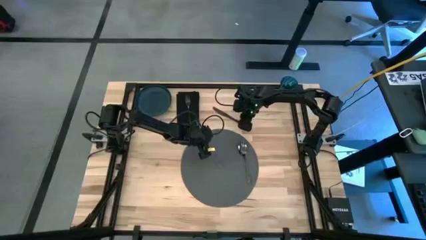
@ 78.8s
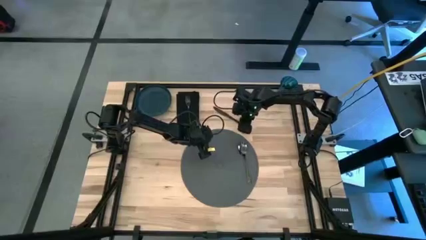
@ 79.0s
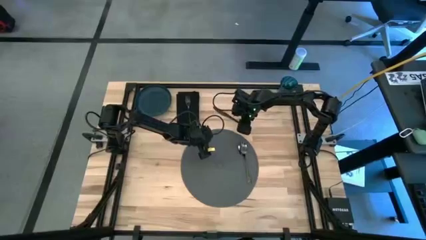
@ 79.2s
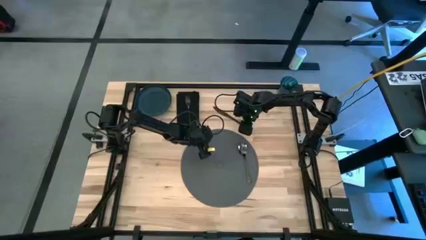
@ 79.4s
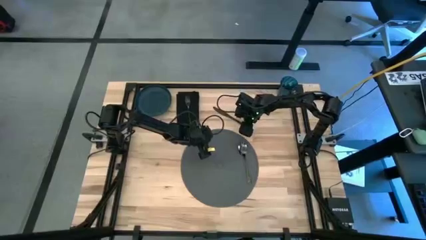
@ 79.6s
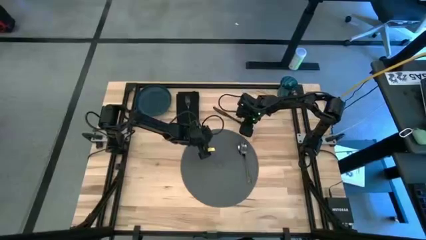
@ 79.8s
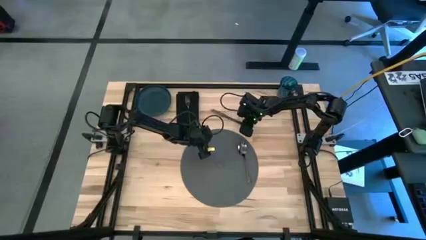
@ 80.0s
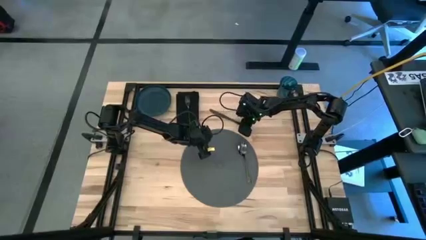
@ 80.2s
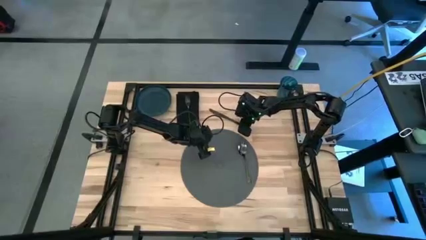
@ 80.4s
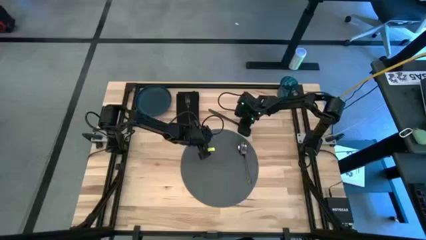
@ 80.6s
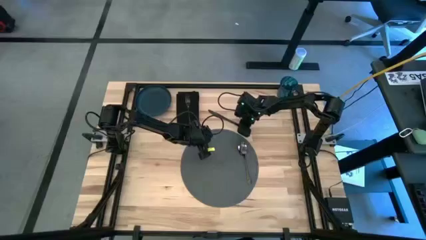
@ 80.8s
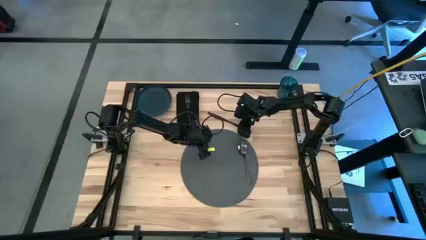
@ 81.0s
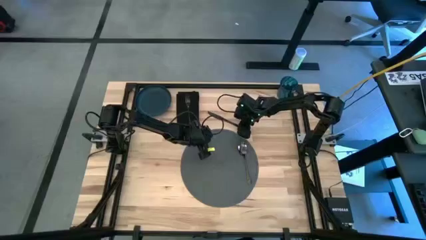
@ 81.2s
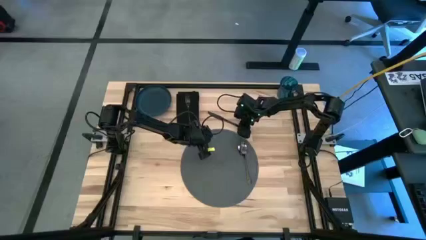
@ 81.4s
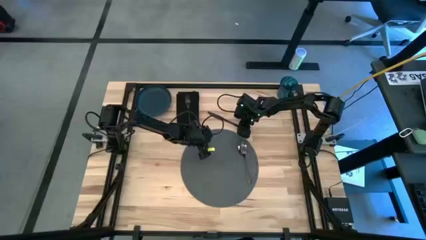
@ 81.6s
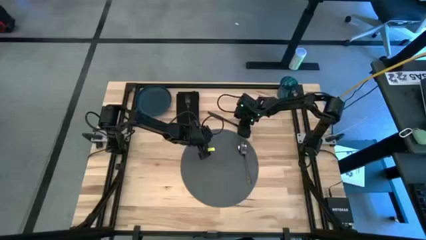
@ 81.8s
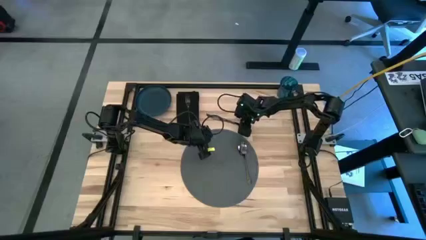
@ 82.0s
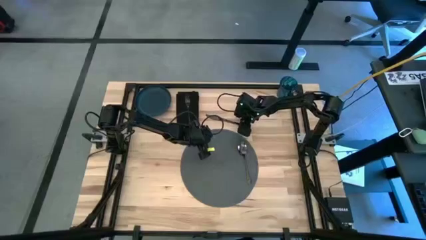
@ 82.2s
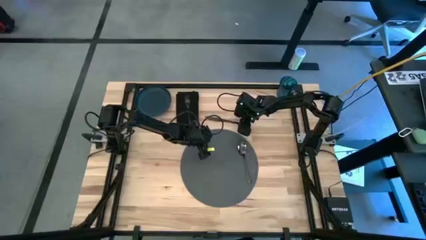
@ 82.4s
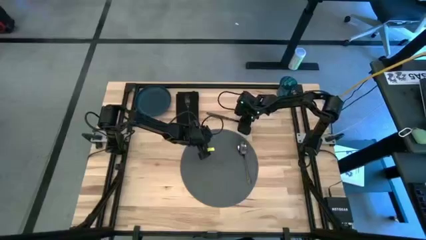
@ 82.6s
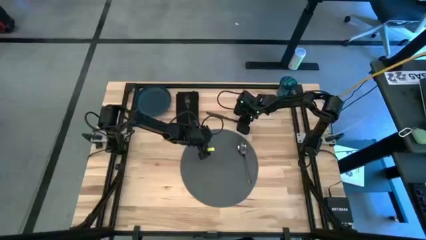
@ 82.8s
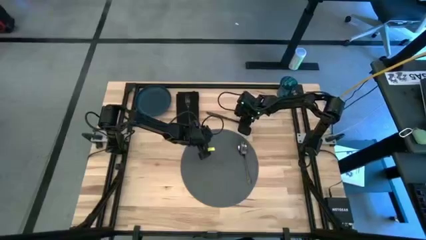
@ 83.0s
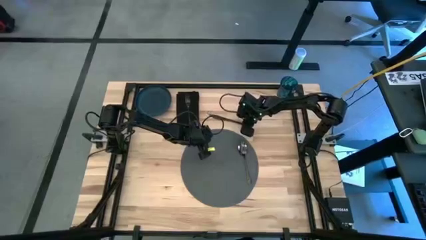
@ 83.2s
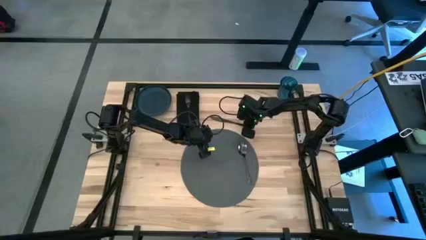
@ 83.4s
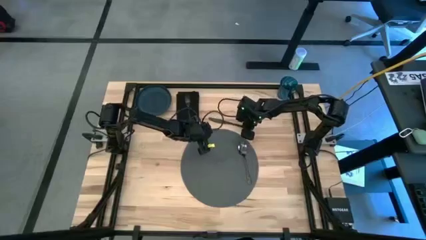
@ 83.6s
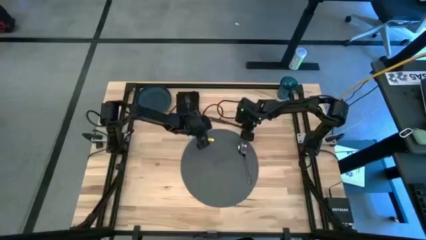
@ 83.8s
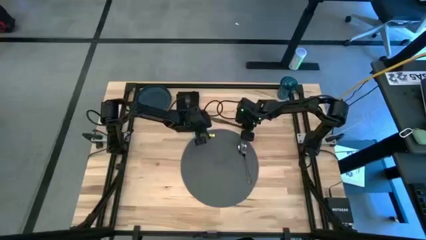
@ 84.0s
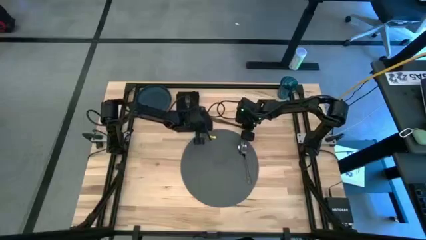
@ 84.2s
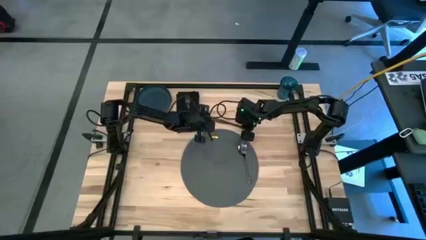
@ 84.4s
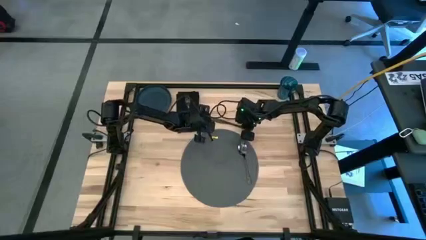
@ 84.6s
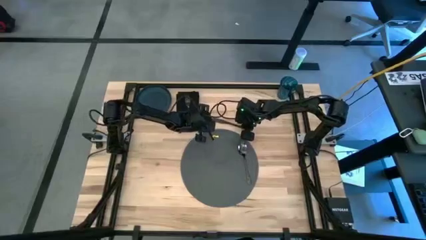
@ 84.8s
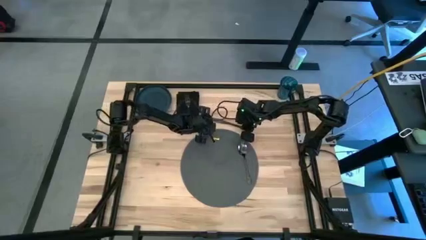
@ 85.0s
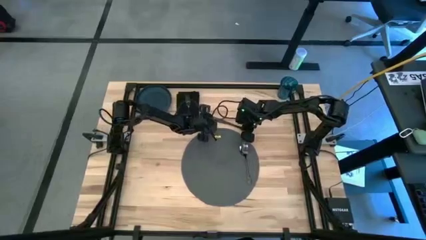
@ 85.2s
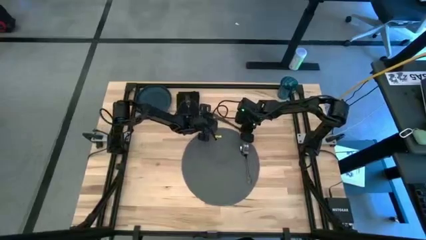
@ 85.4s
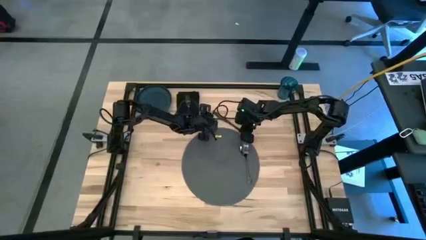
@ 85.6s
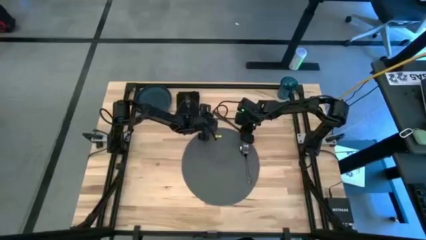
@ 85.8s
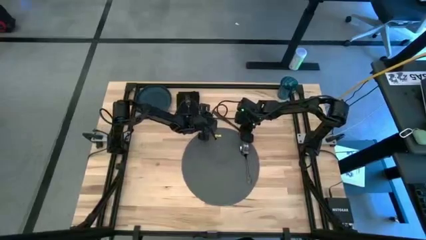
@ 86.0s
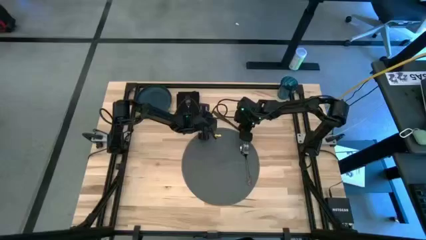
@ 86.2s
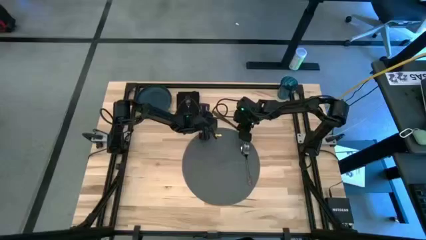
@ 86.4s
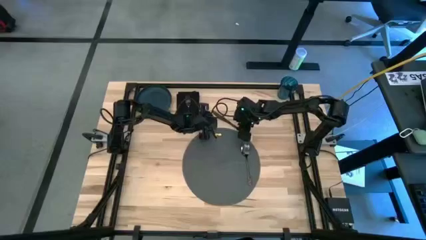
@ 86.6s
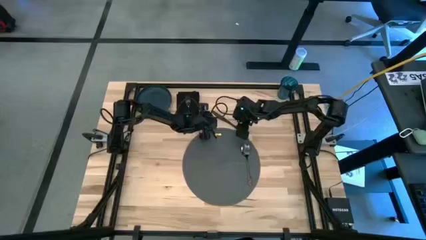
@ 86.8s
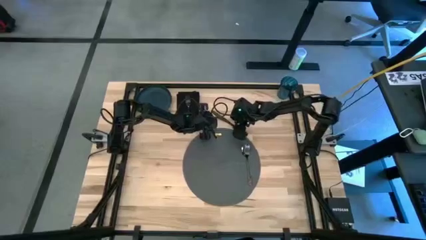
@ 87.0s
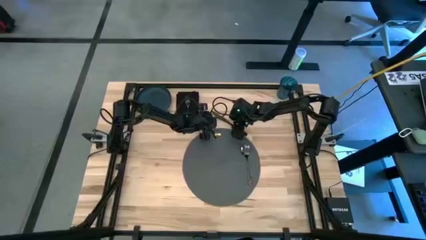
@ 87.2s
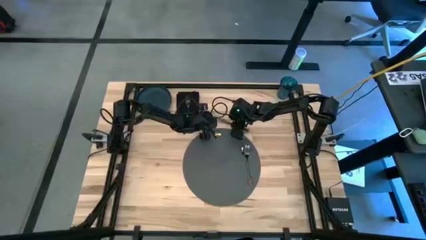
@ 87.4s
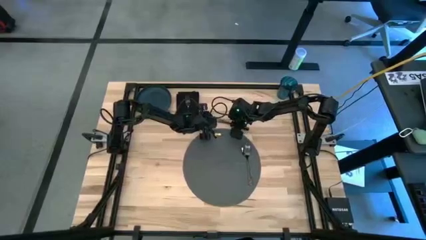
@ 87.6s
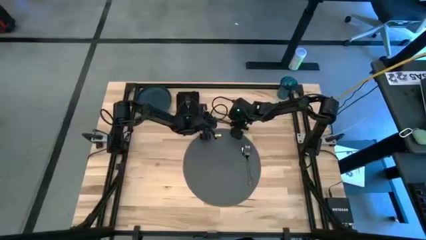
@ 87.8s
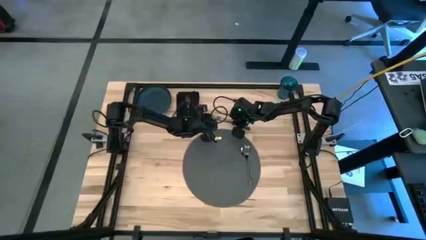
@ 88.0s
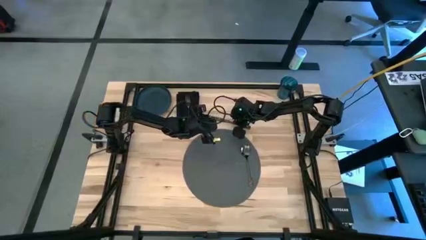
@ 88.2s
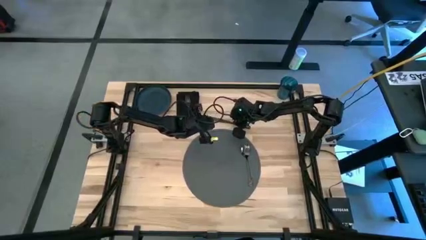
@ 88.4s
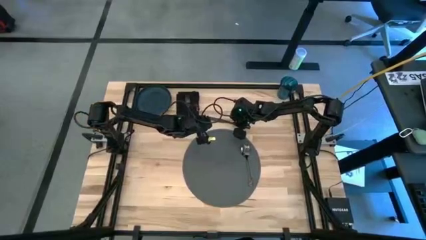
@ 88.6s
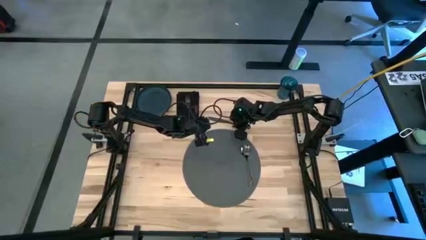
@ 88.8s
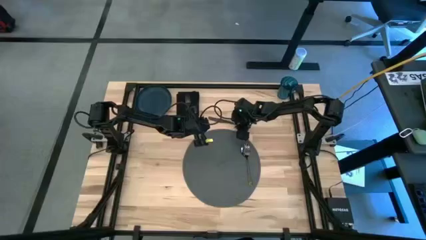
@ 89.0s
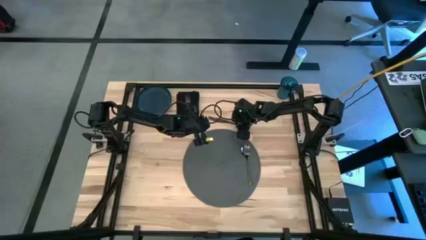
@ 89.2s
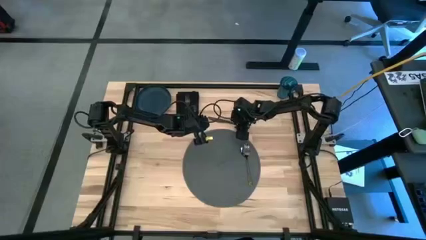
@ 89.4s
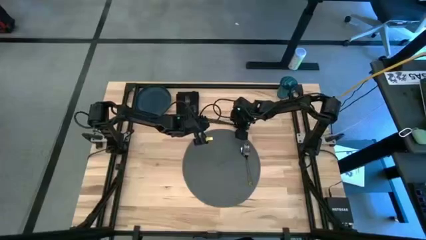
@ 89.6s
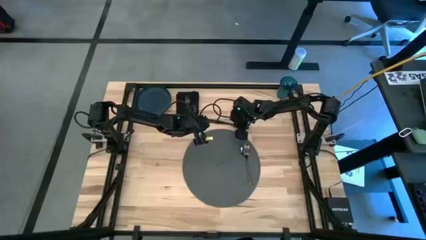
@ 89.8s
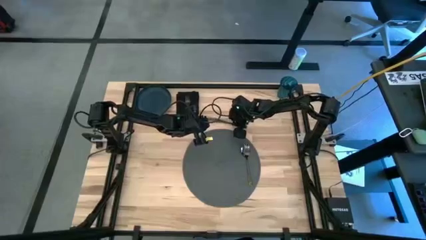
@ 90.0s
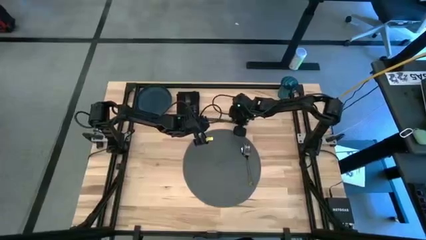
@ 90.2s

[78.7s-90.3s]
Task: Set table place
Put the black table knife on the gray tablemat to the left of the black spoon

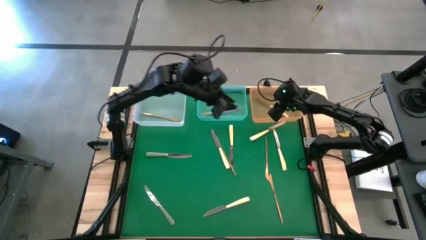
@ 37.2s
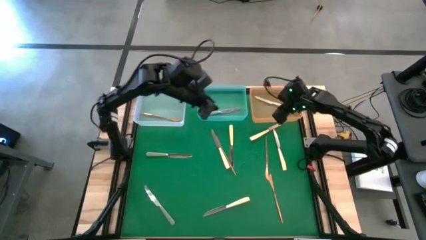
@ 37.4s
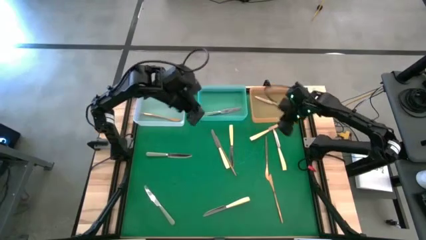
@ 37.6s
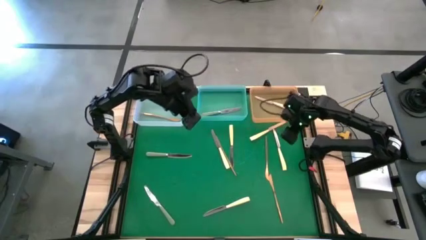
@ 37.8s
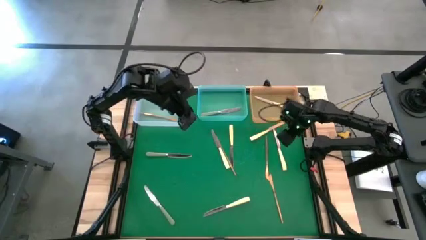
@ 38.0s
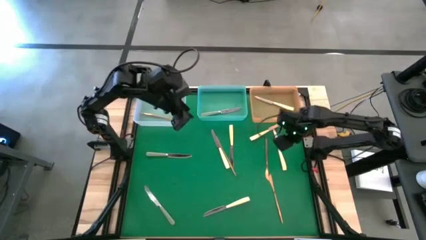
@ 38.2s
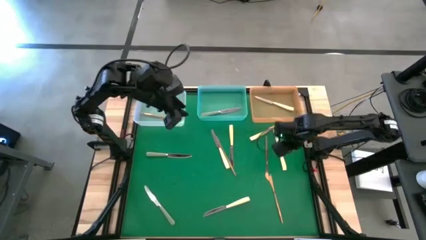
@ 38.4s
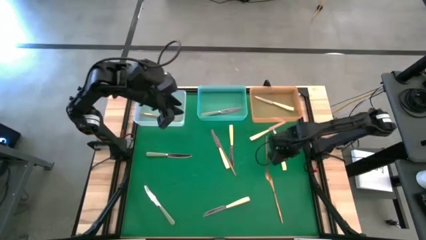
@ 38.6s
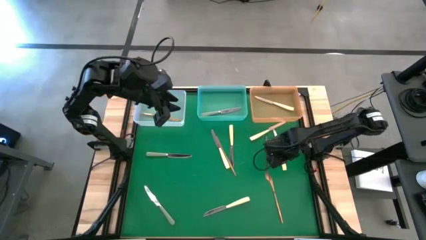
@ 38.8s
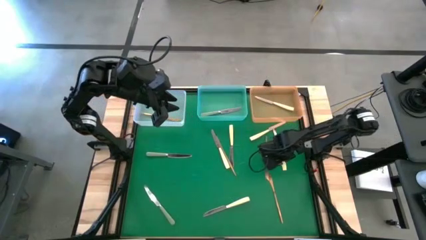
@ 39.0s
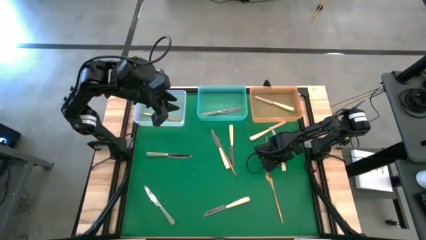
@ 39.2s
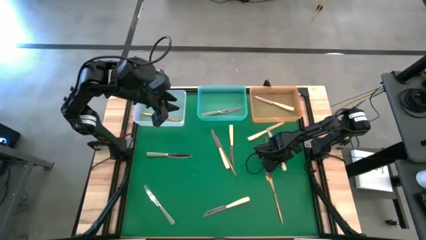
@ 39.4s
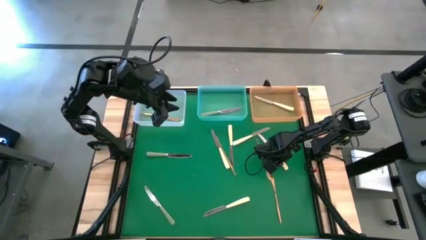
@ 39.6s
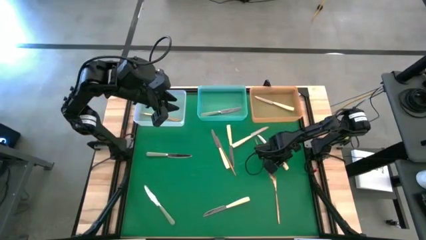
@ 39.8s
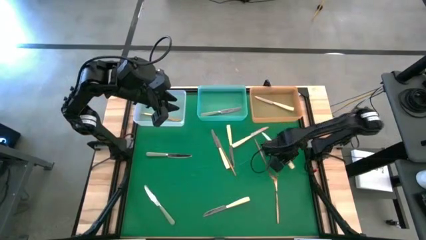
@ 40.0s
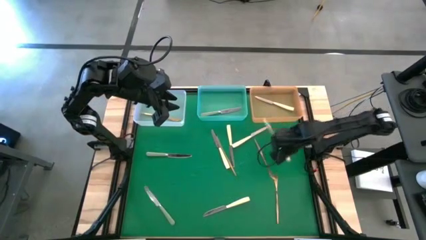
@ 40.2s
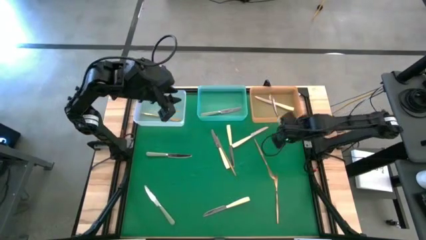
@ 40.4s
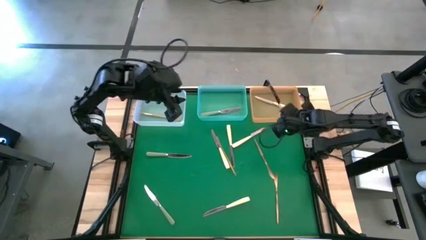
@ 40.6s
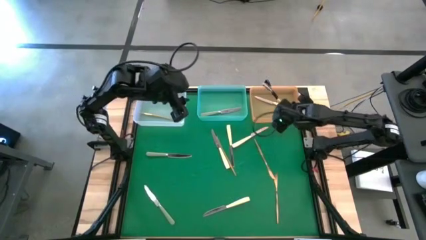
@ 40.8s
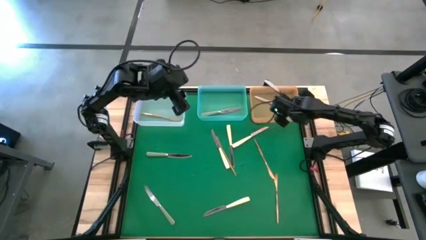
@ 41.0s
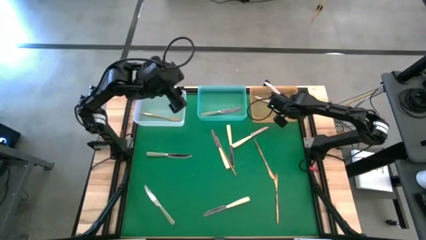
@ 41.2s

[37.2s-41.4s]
Task: Sort silverware by color (type)
Put the yellow table knife into the orange bin
